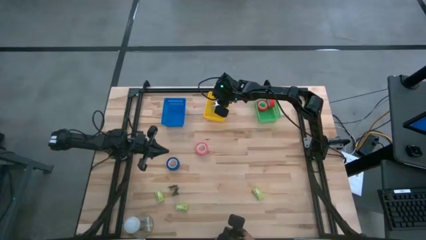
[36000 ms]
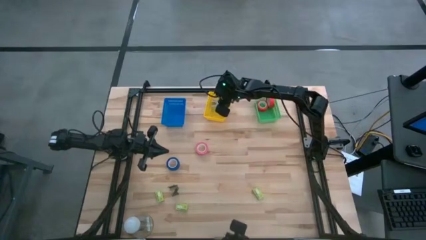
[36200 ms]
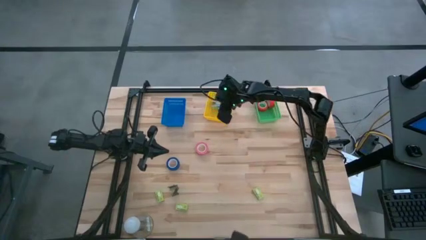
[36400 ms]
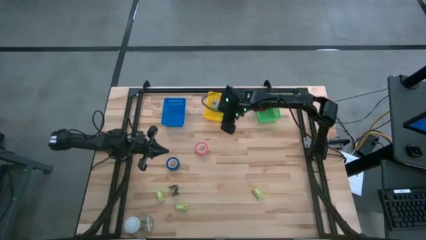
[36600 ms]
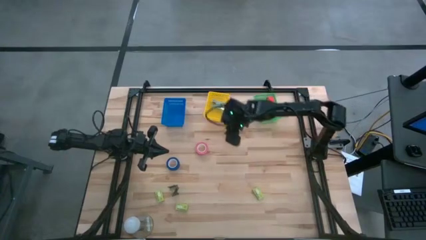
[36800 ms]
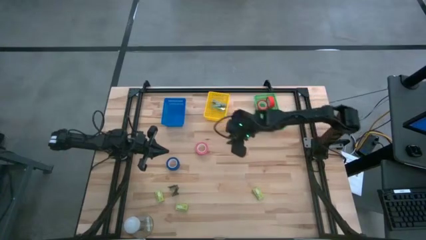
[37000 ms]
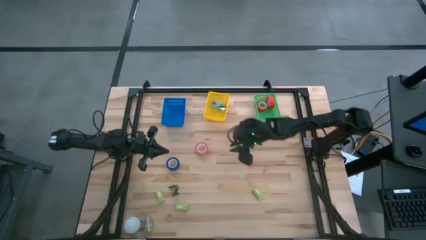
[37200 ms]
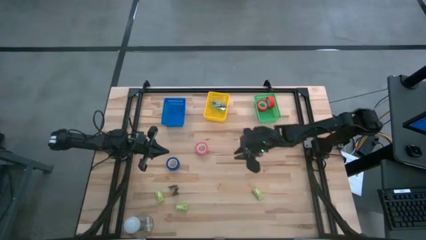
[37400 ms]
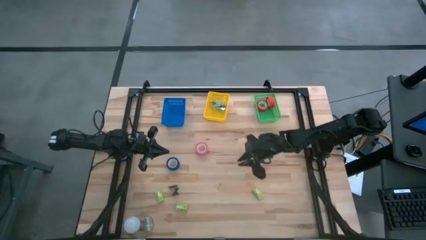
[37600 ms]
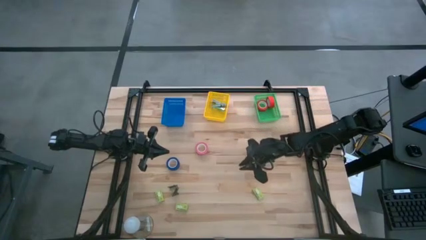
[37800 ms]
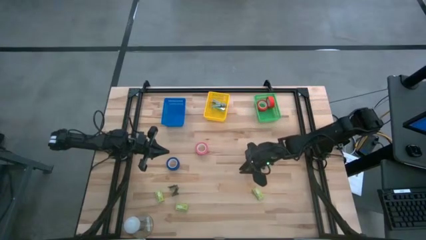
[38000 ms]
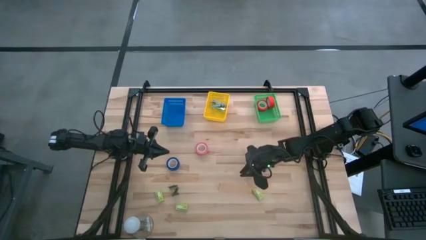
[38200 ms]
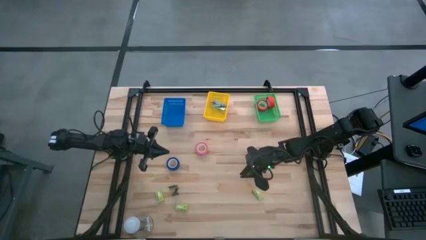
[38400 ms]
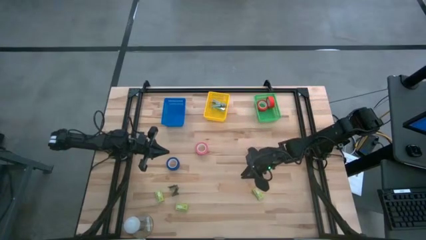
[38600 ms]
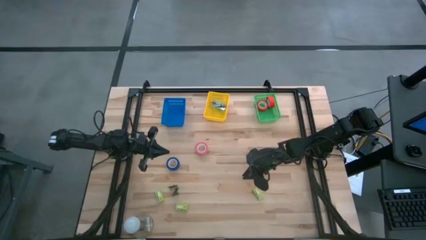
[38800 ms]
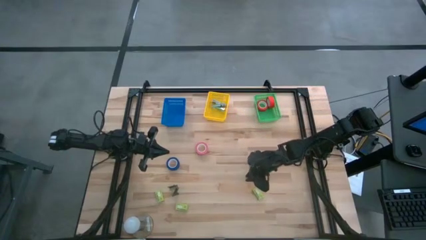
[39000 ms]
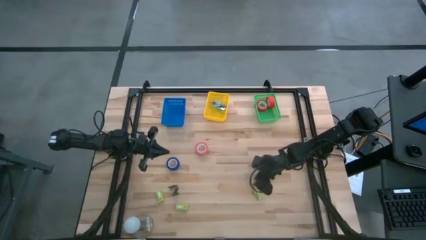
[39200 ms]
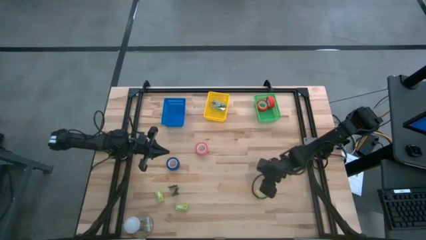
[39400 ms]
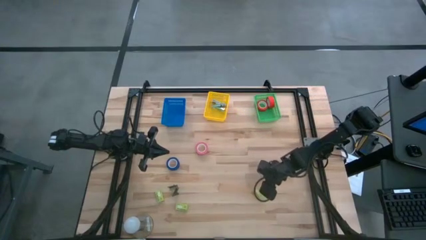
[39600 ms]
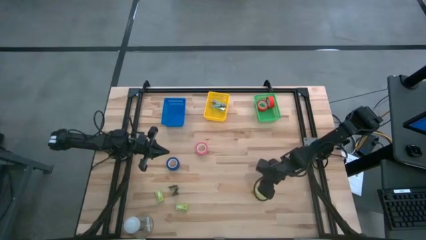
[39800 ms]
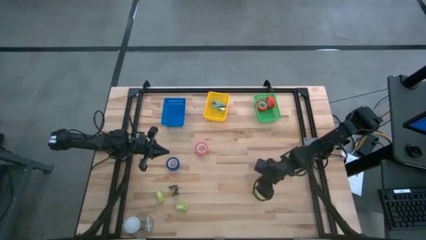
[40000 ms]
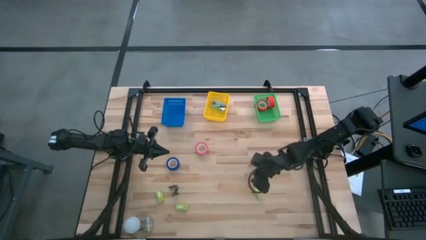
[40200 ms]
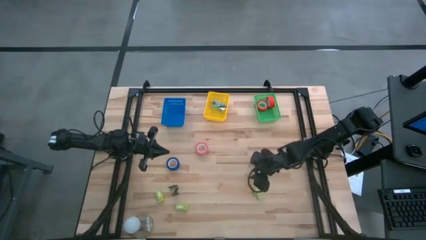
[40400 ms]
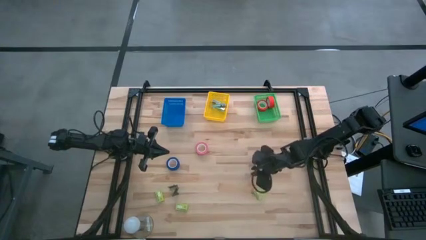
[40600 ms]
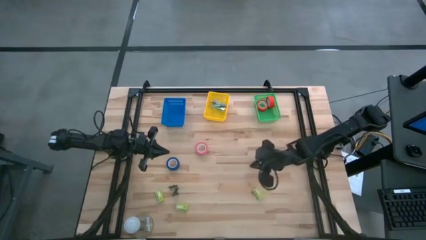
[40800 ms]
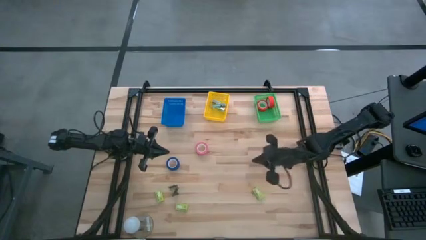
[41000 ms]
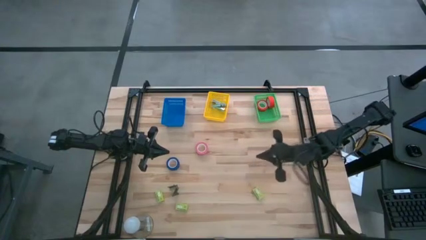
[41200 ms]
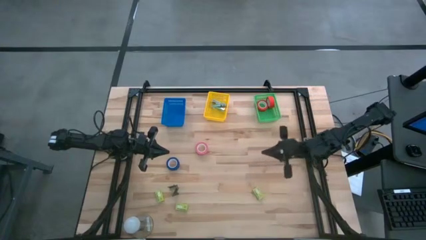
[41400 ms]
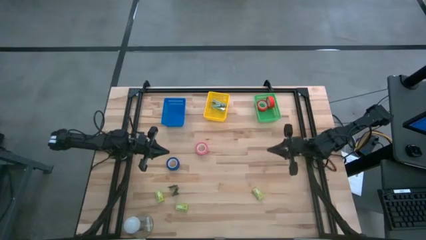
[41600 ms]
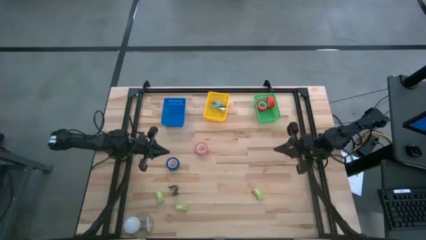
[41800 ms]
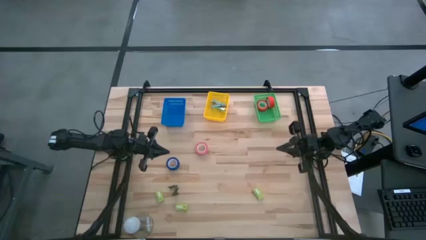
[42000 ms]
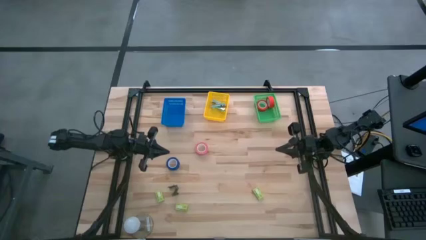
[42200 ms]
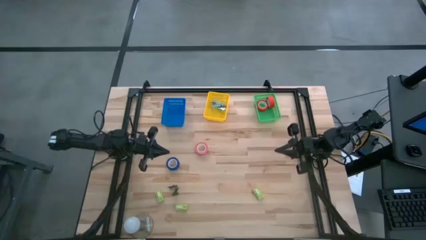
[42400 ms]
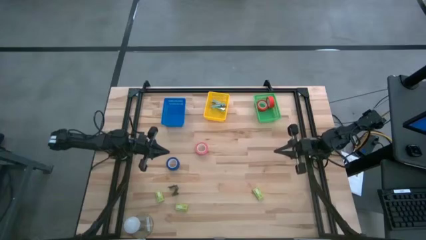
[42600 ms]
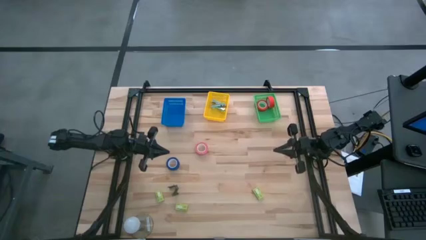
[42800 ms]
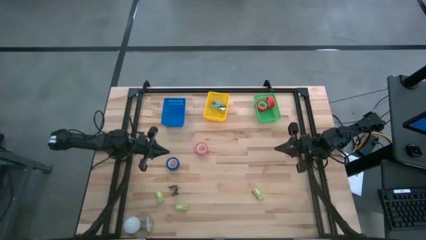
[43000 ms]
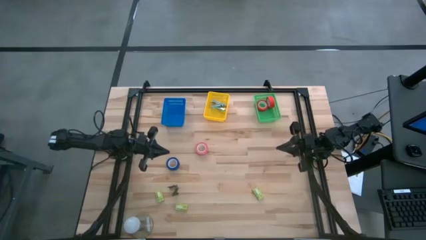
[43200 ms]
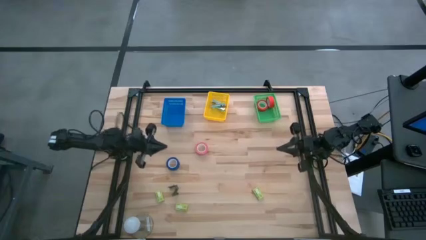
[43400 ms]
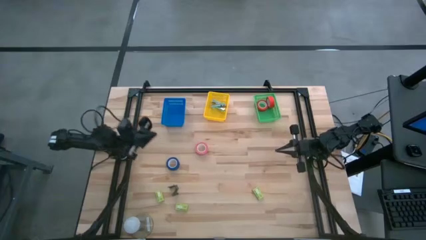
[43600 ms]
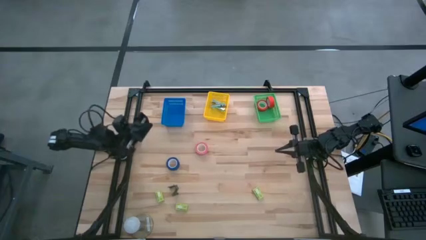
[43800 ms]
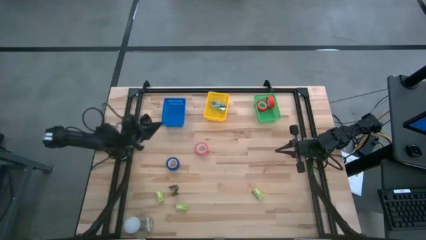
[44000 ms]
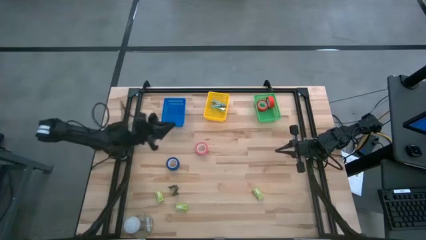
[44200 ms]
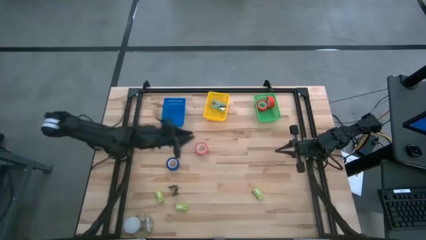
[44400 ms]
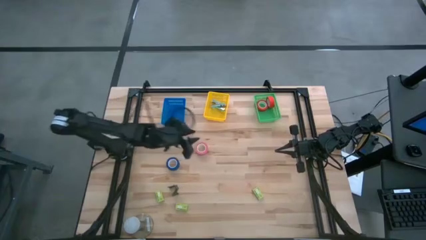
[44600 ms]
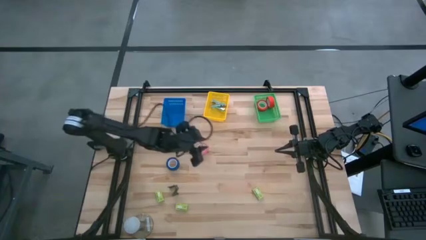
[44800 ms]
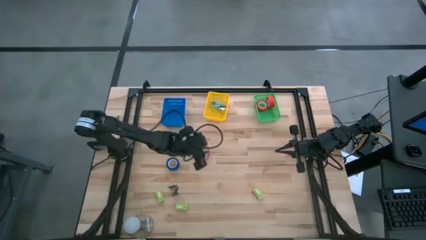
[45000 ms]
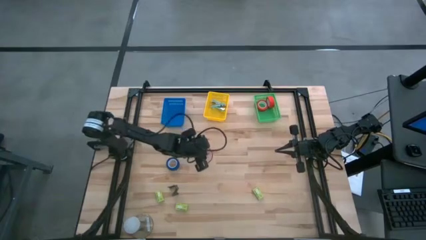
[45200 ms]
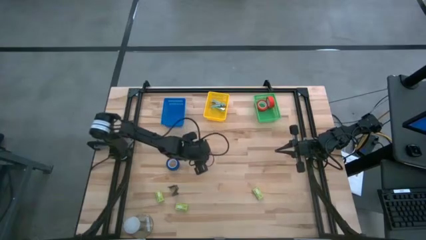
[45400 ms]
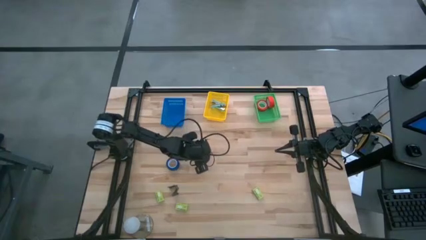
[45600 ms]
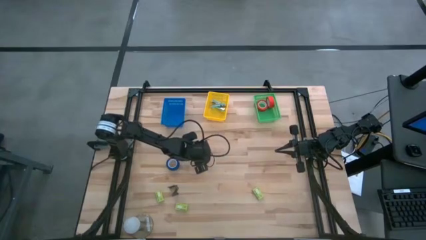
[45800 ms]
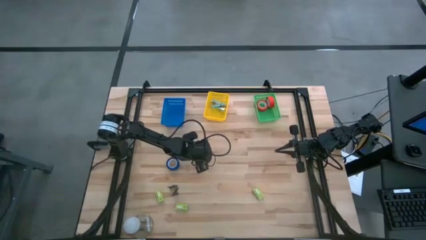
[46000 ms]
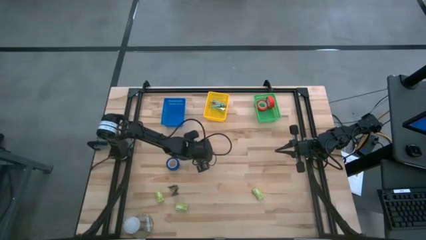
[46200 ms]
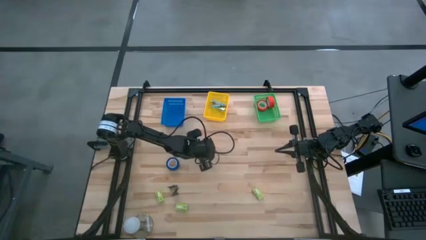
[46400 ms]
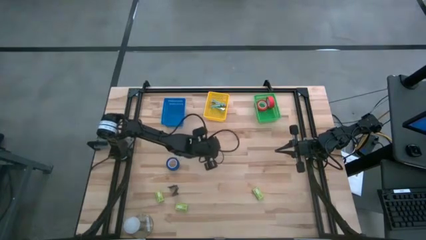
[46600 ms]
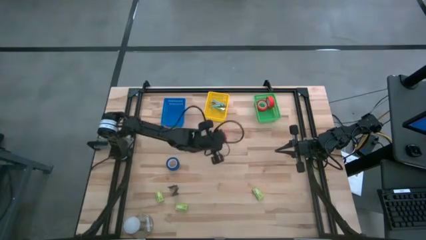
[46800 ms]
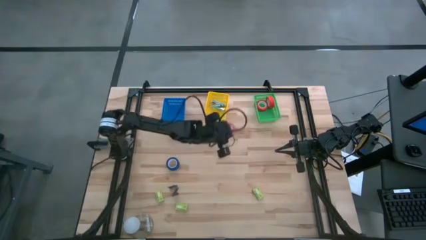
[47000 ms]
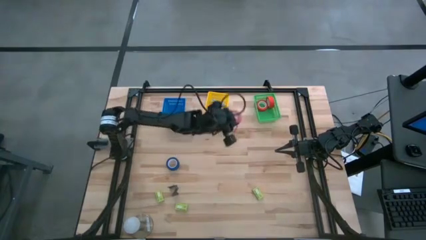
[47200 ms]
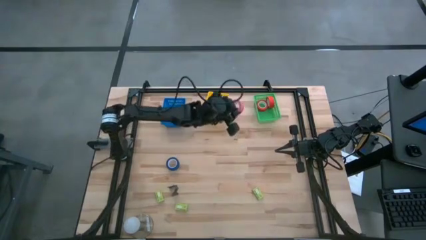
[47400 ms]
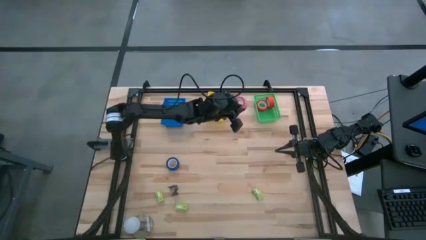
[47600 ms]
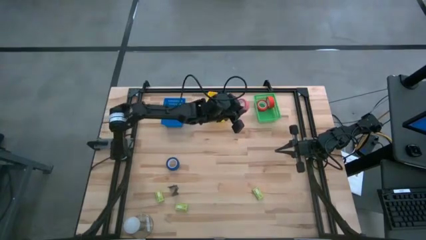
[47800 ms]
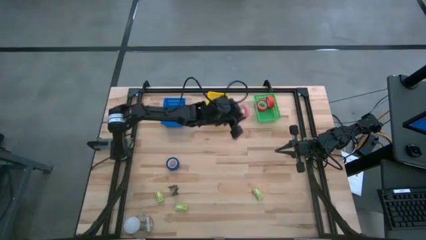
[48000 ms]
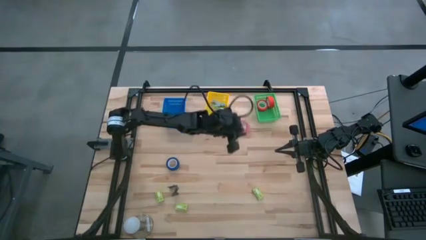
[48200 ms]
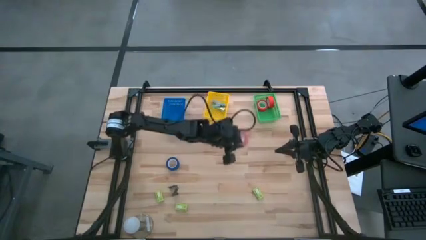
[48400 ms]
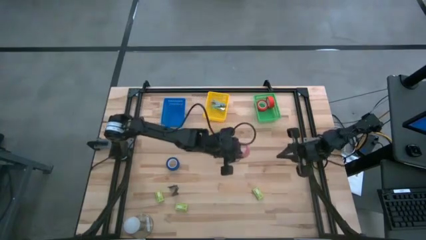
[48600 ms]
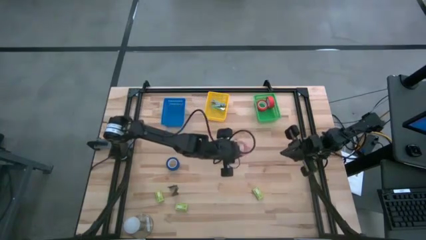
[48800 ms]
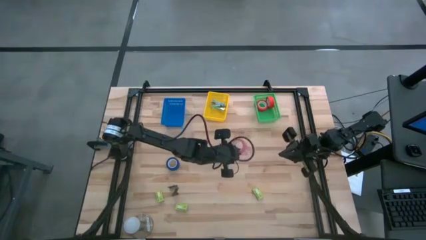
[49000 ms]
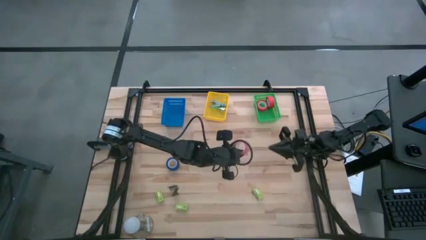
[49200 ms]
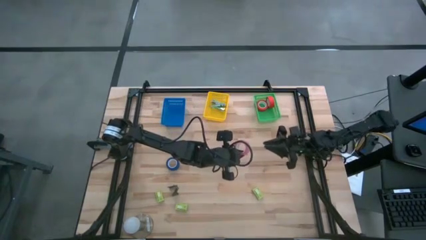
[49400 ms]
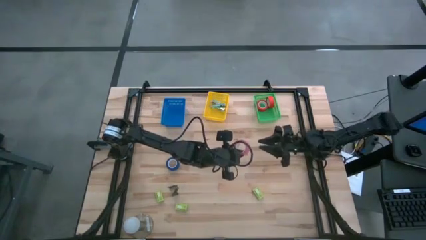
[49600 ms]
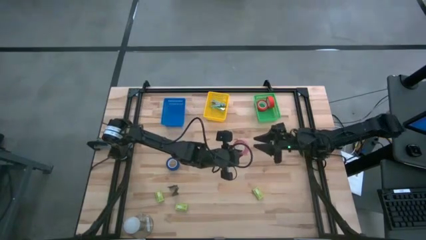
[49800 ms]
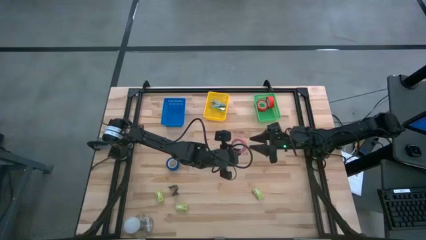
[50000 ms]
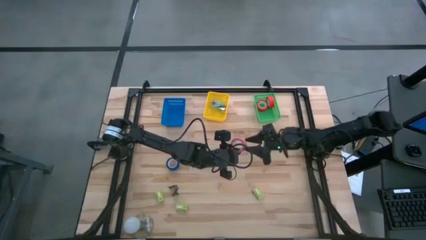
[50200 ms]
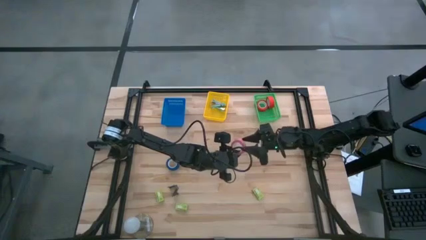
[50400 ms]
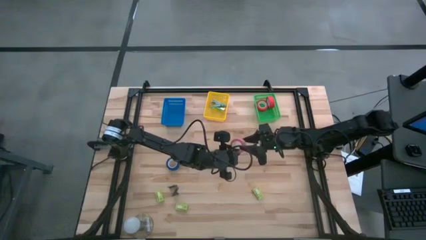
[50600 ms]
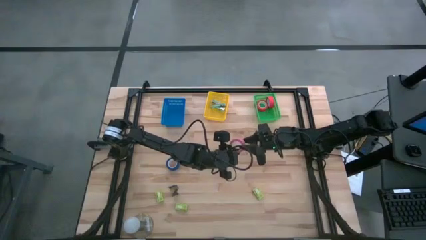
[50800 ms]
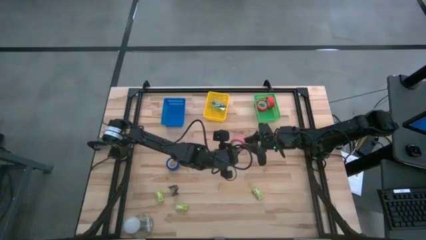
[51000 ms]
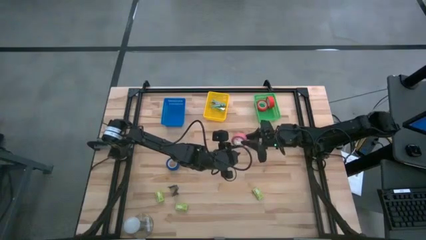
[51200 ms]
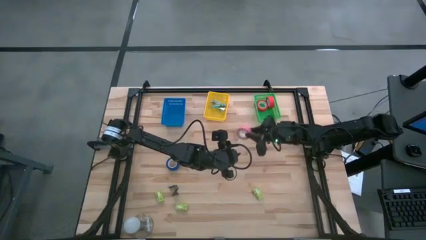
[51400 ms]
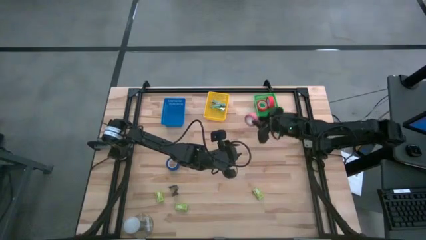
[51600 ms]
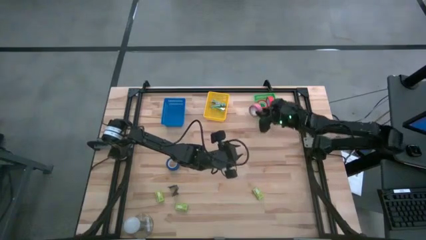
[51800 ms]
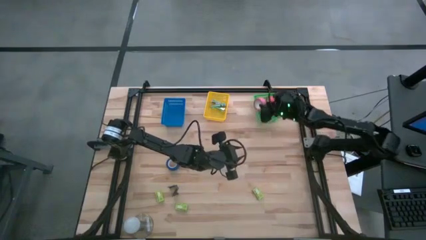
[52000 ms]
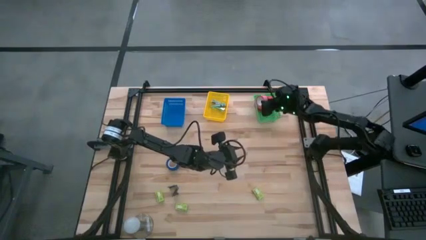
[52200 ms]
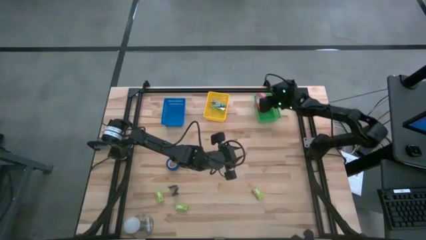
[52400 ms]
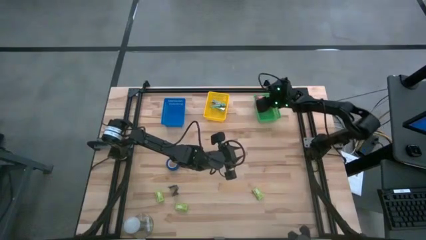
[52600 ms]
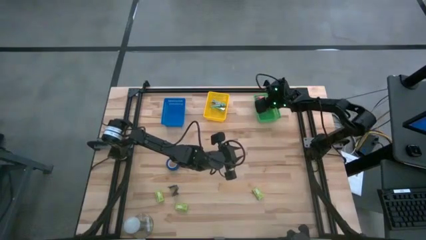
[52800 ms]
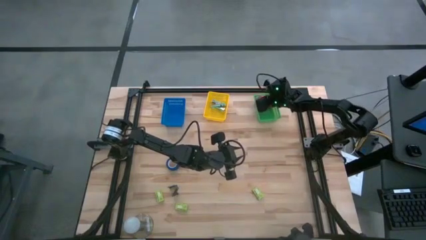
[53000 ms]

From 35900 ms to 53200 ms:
Task: Pick and place Stapler, Stapler remover, tape
Put the pink tape into the green bin
